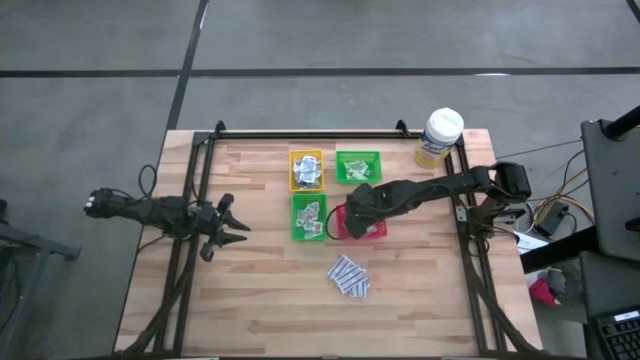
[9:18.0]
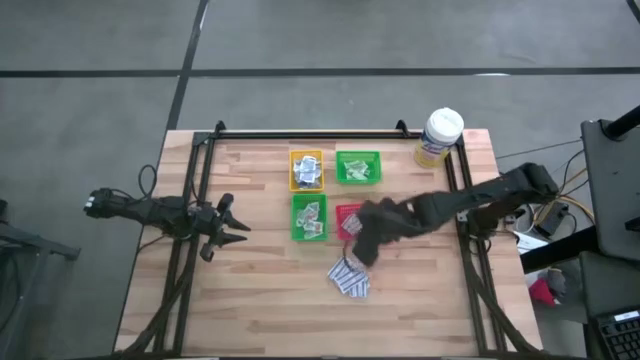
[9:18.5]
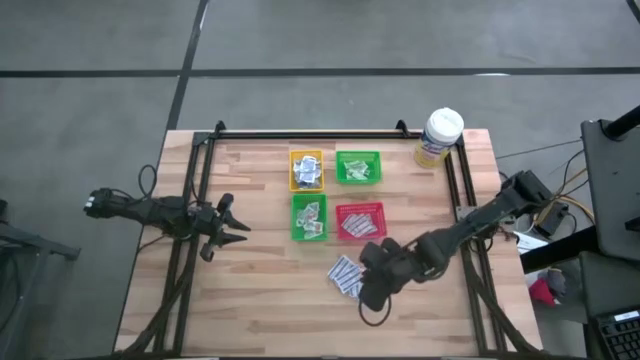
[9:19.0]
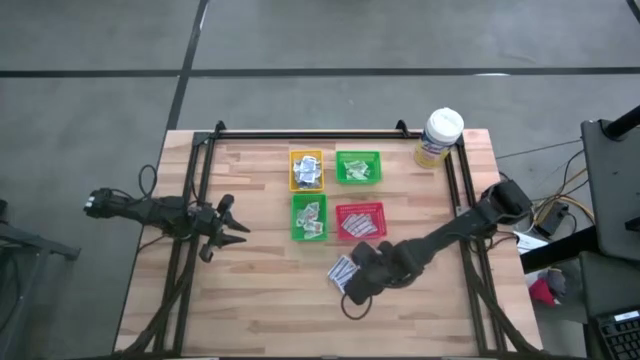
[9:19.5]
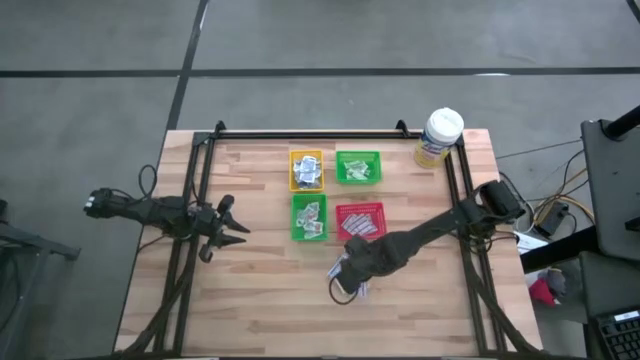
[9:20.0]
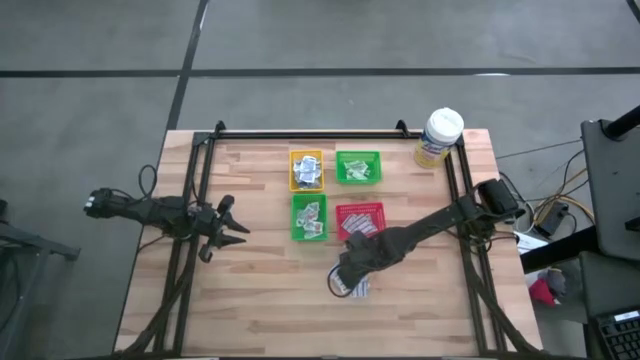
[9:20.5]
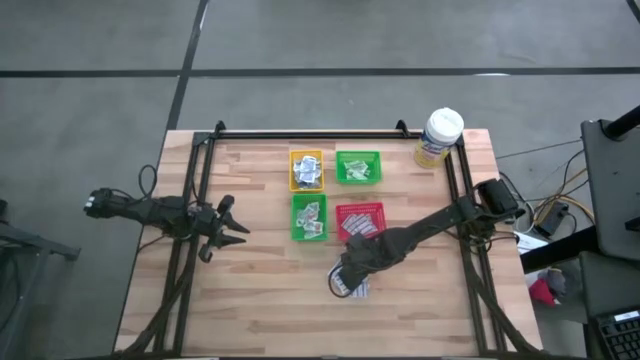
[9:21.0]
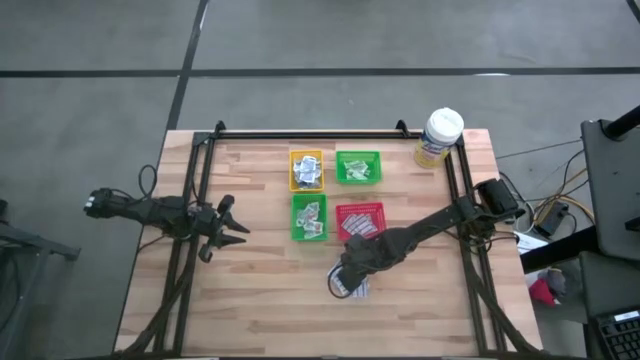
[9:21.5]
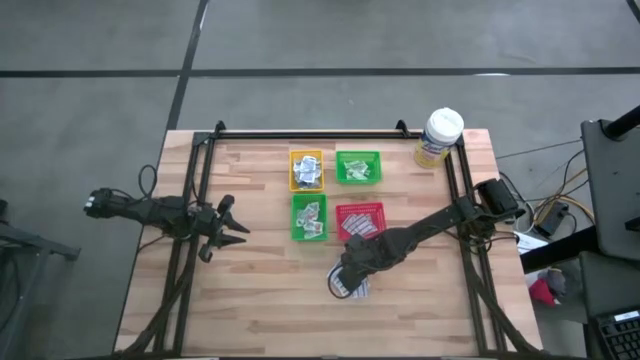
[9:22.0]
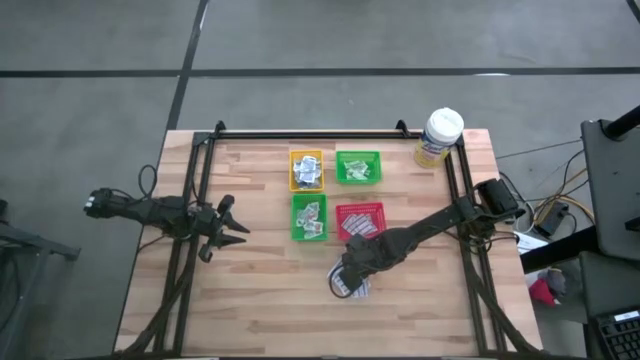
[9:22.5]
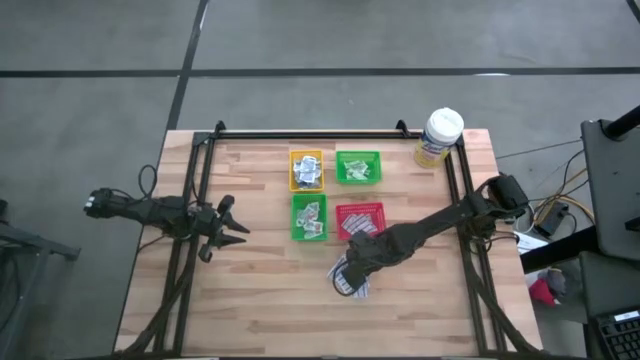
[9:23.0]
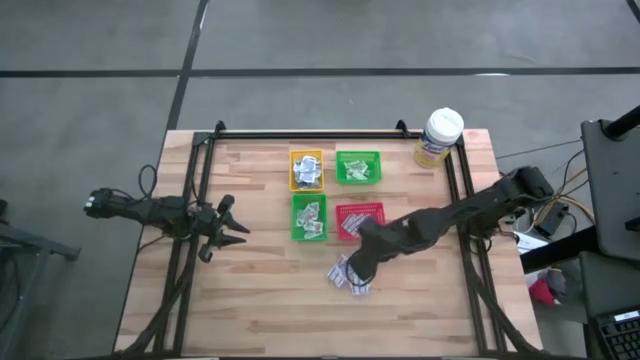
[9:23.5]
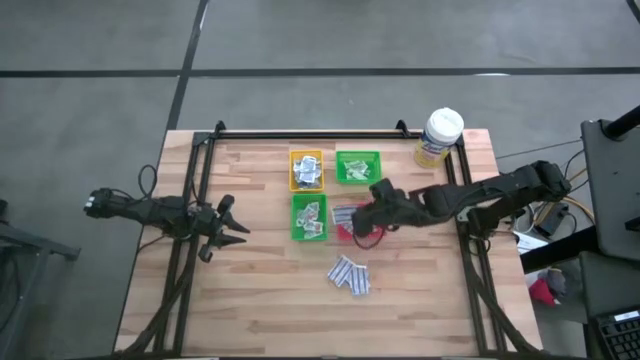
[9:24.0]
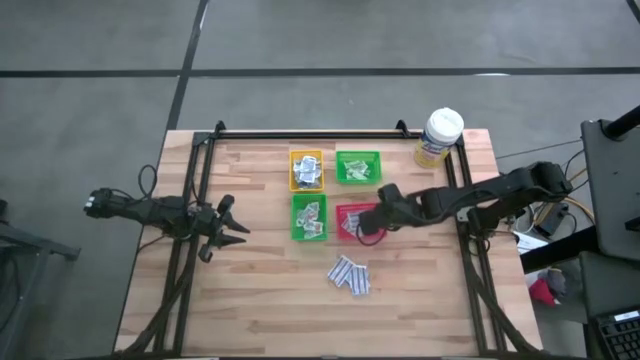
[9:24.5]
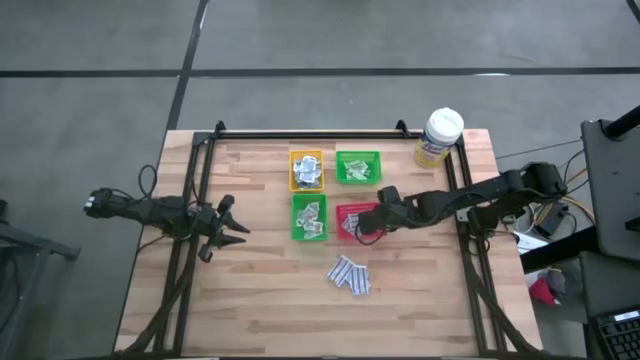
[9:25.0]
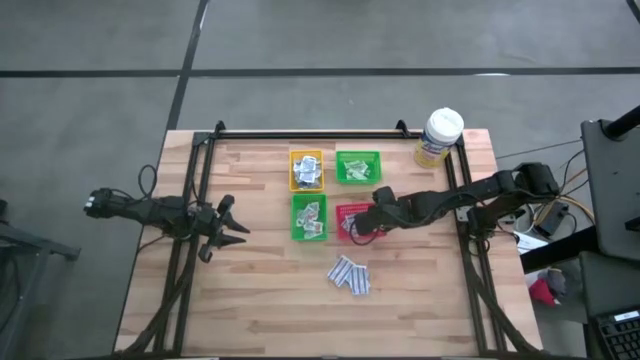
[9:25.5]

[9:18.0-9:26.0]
Task: Pick & Place First Aid Supplies
Put the blue bandage pack into the red bin

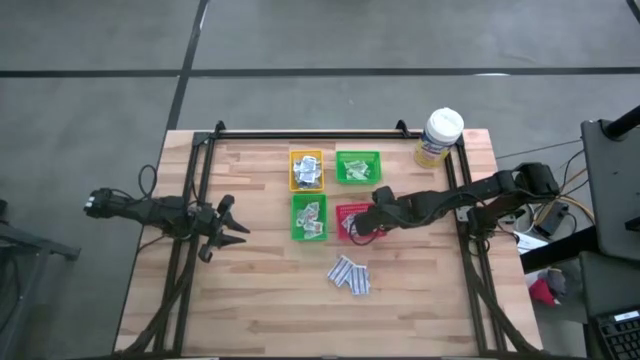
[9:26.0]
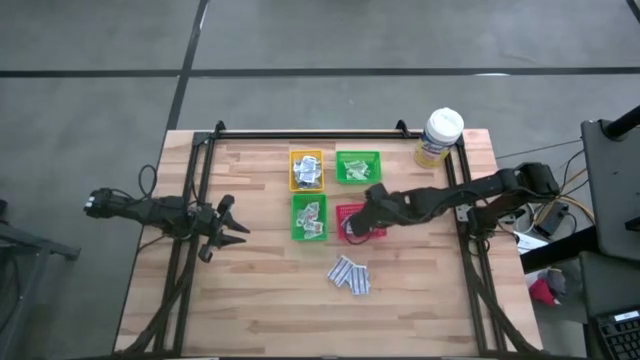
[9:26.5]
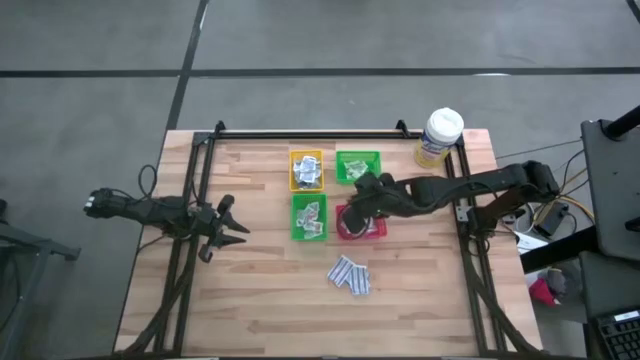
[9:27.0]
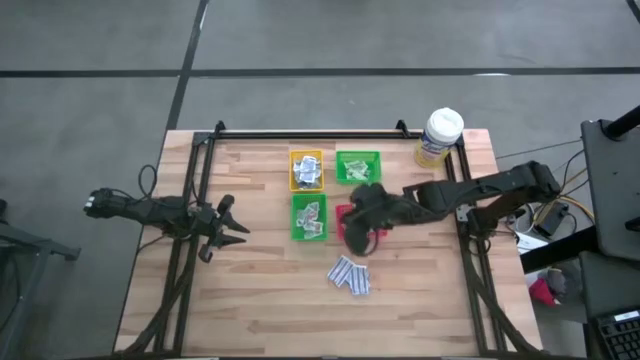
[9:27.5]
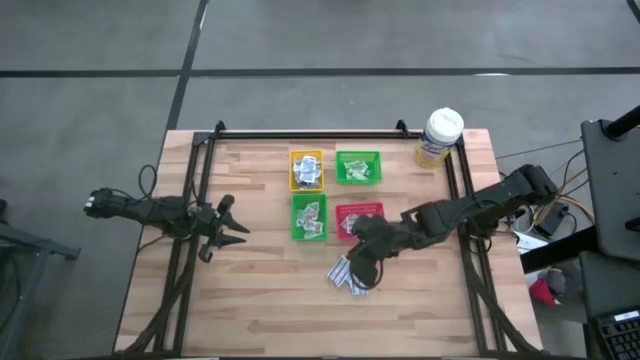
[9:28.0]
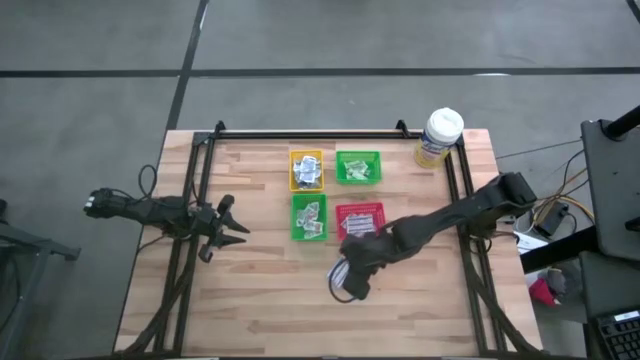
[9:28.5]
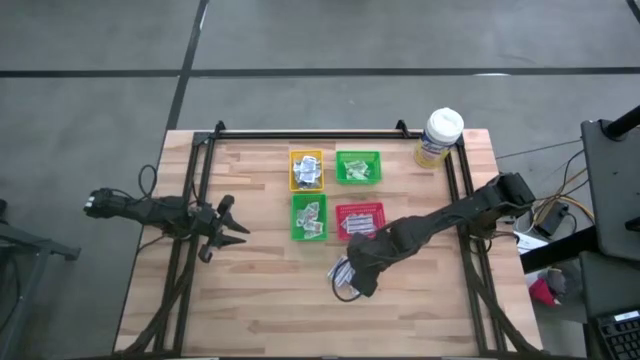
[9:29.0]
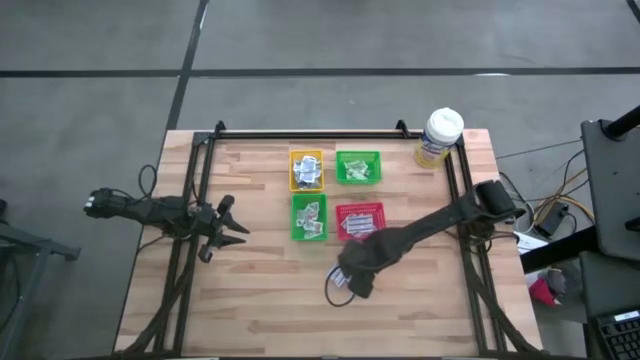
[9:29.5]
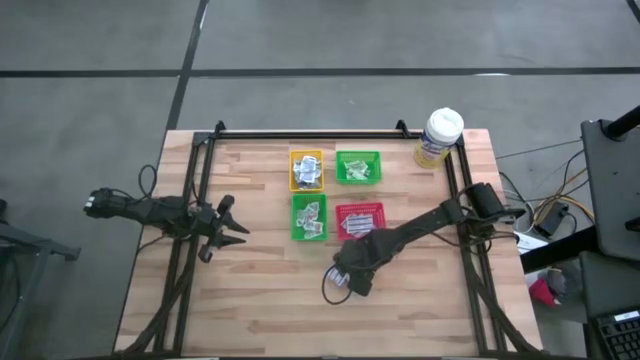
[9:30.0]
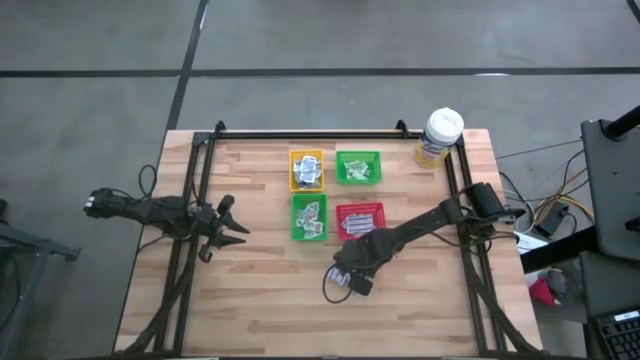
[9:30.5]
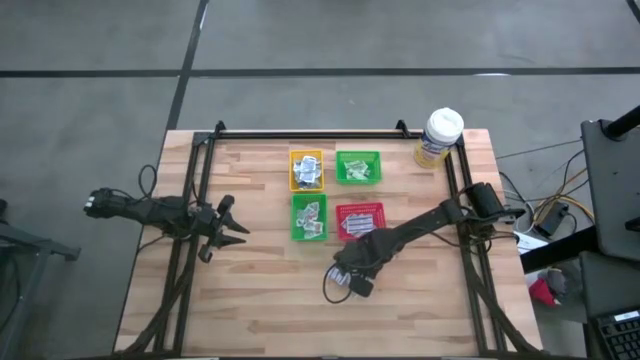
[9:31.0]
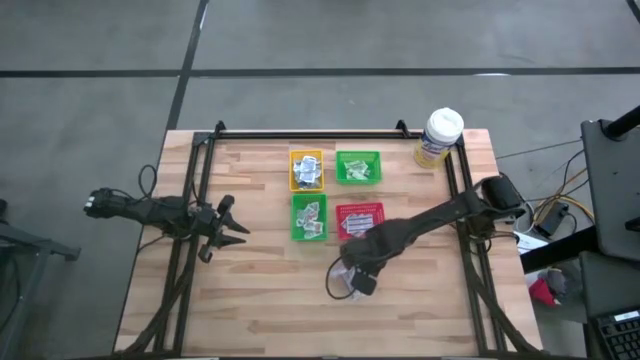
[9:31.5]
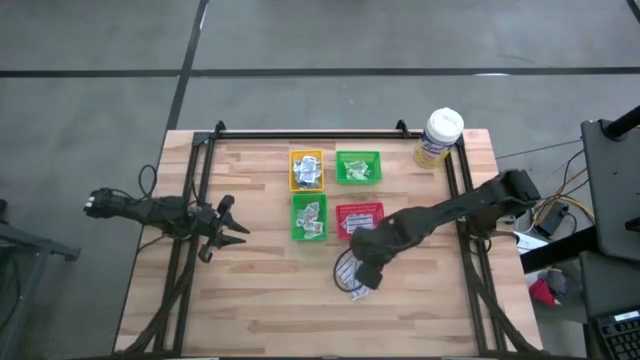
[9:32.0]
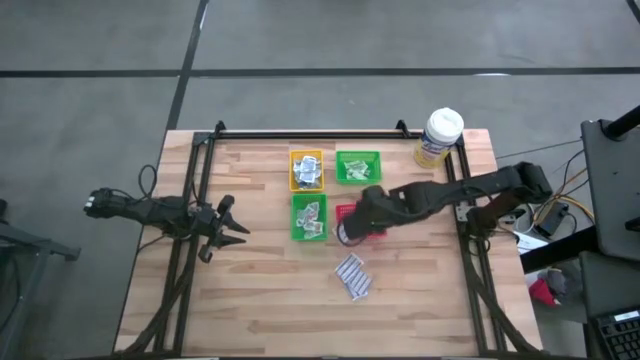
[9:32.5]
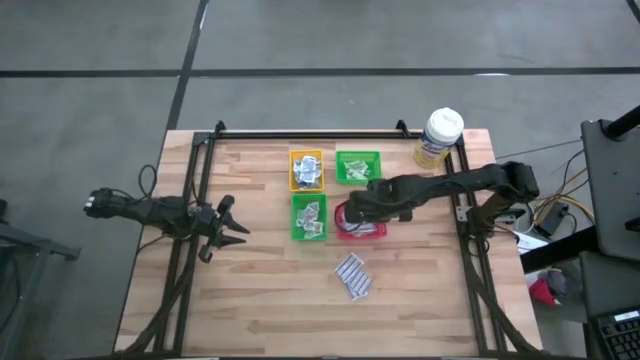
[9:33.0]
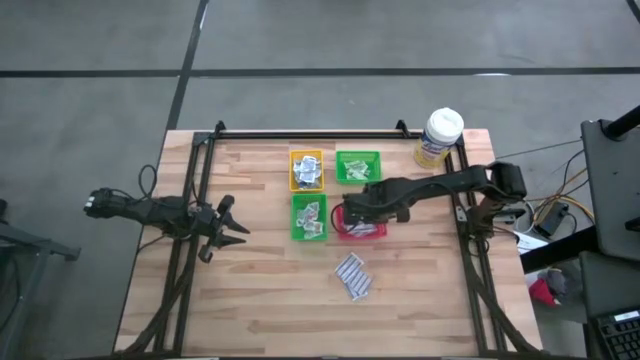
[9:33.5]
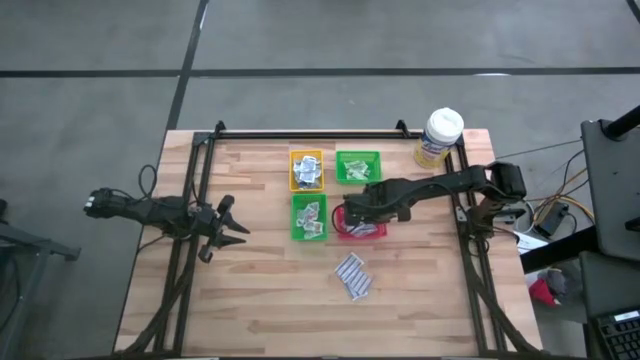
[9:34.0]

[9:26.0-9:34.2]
Put the blue bandage pack into the red bin

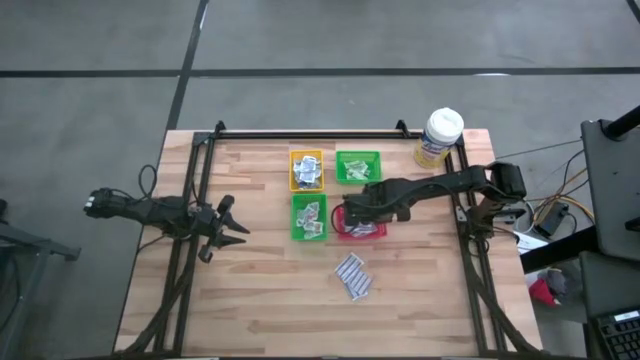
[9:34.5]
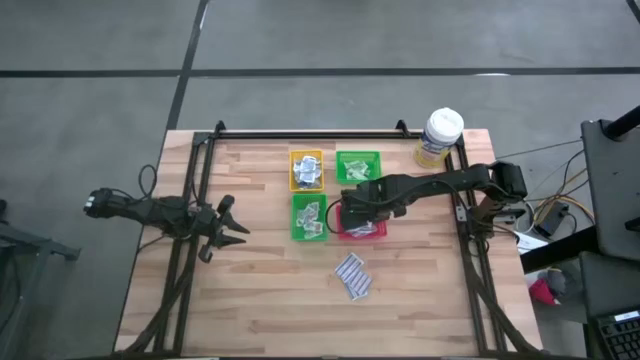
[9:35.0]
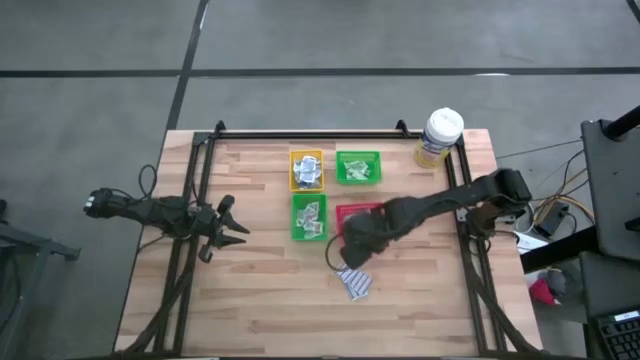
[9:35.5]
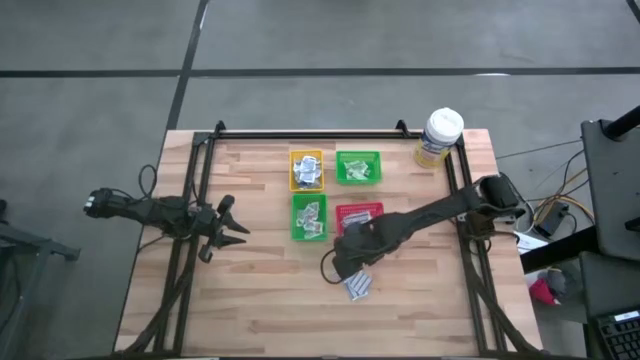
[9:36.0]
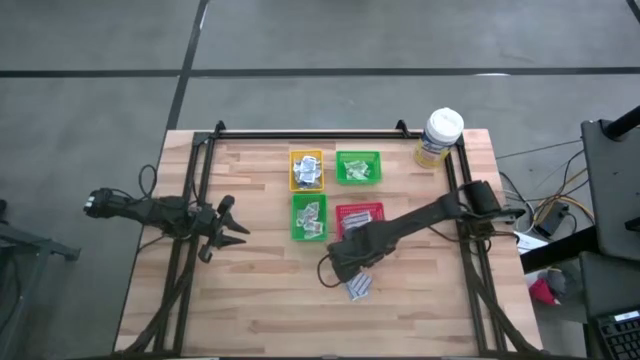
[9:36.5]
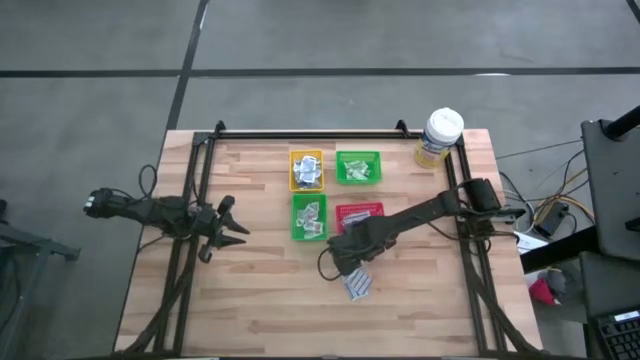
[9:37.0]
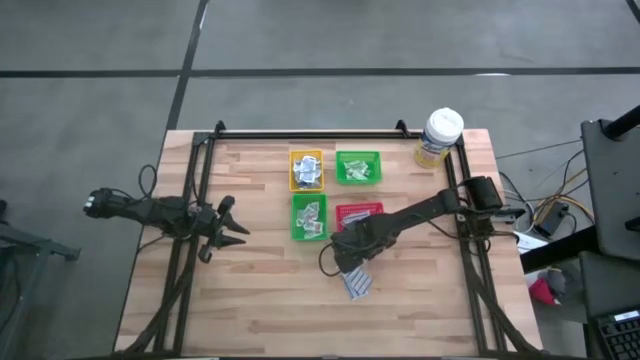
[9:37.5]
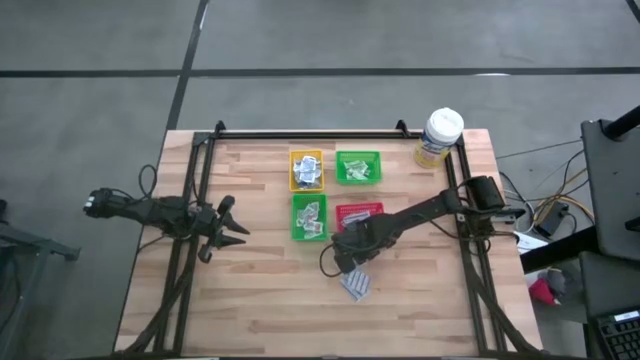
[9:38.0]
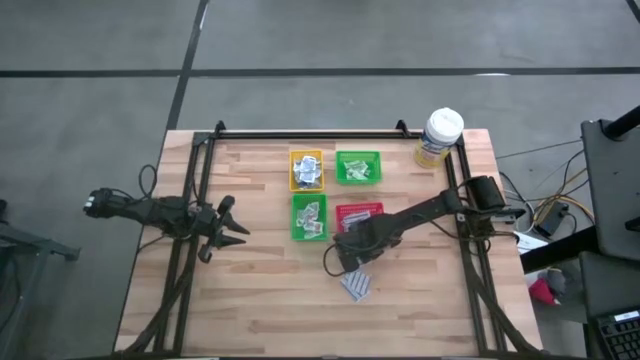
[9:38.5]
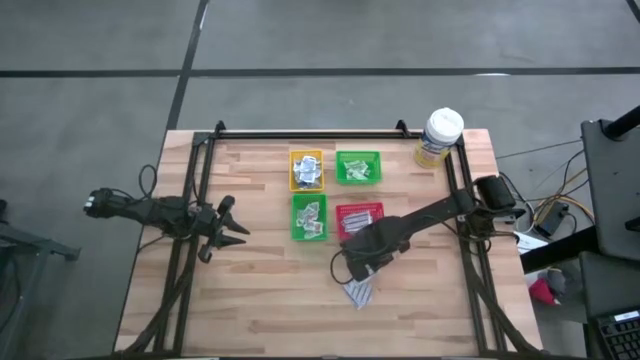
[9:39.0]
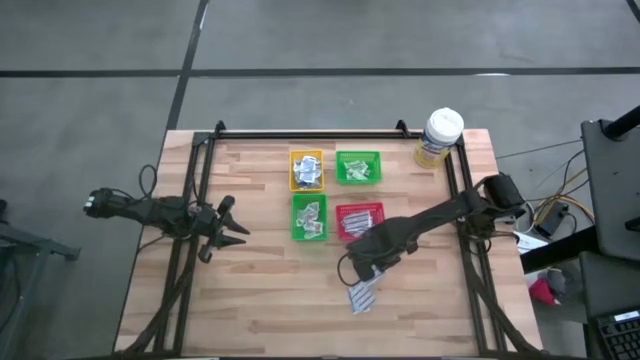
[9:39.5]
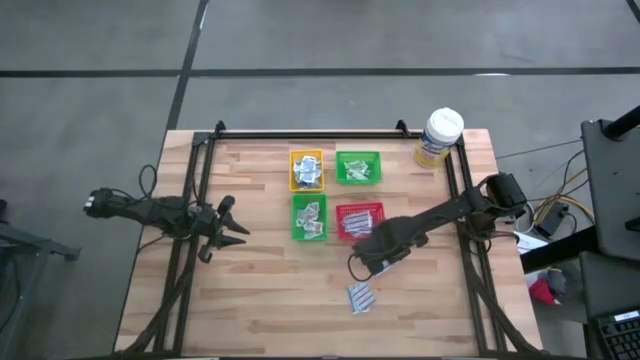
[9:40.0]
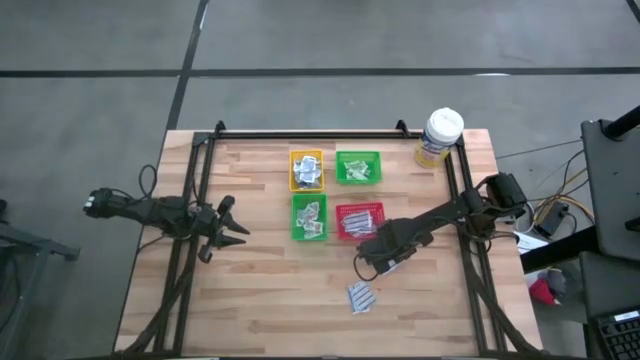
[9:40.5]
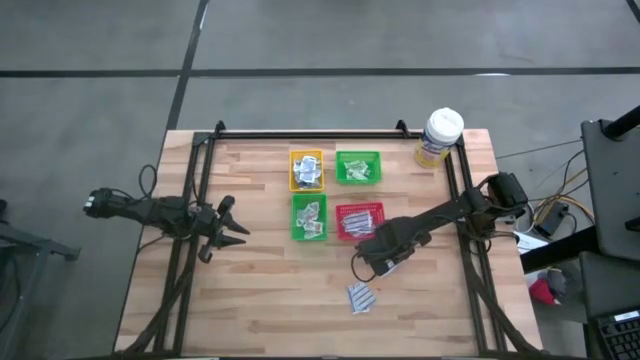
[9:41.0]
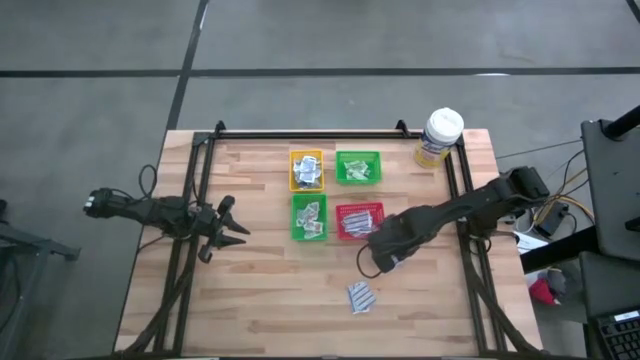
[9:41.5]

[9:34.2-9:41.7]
Put the blue bandage pack into the red bin
